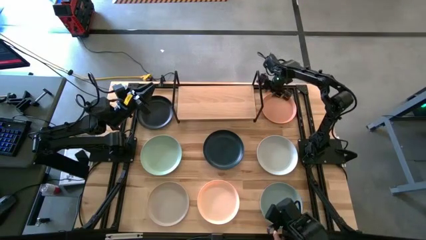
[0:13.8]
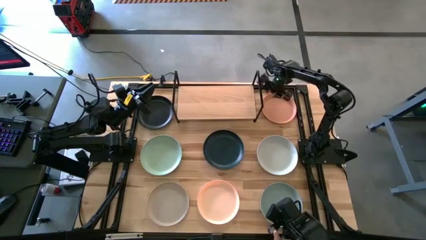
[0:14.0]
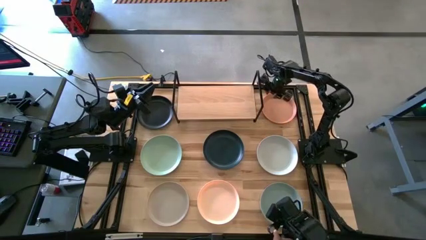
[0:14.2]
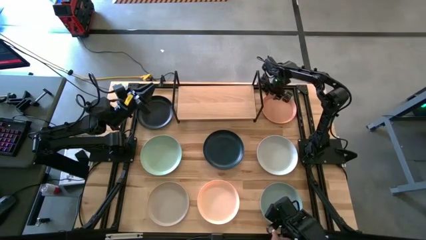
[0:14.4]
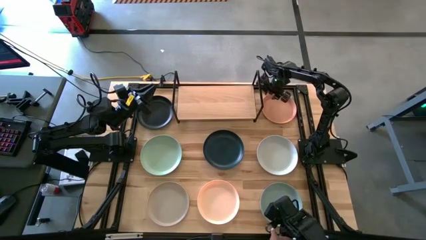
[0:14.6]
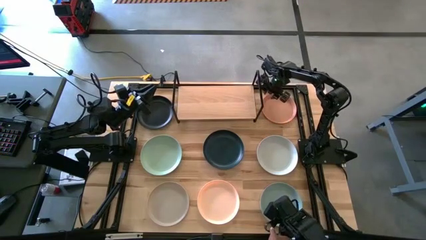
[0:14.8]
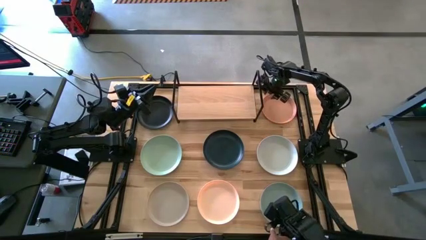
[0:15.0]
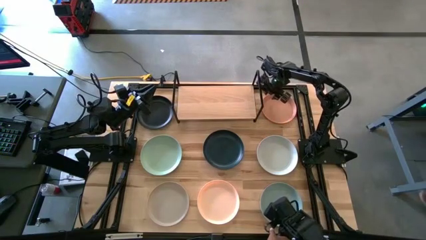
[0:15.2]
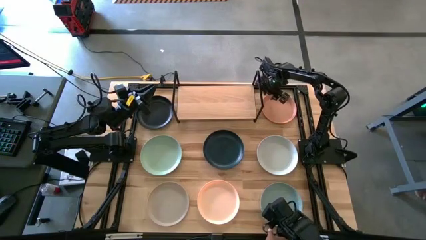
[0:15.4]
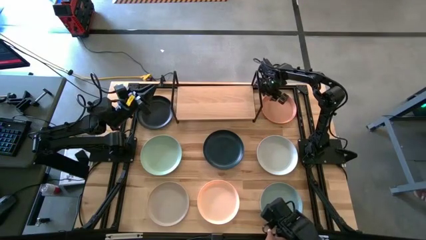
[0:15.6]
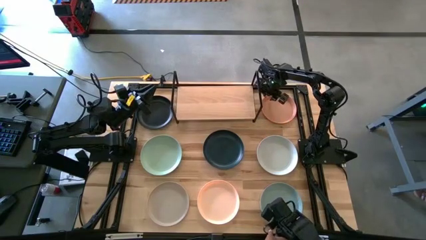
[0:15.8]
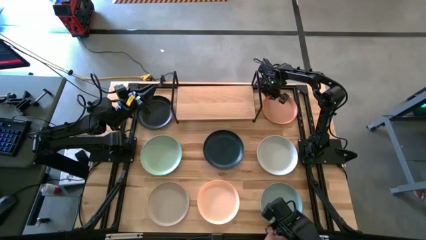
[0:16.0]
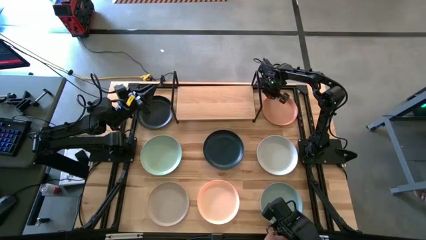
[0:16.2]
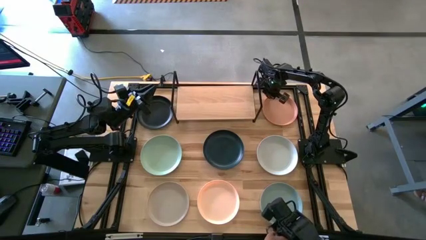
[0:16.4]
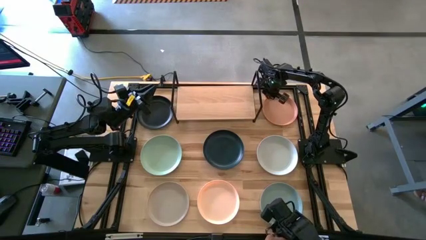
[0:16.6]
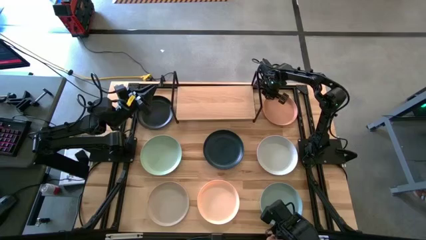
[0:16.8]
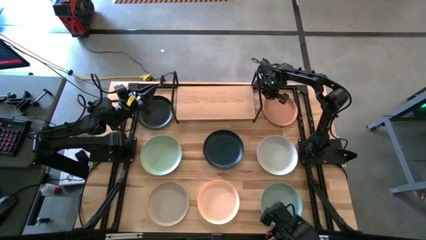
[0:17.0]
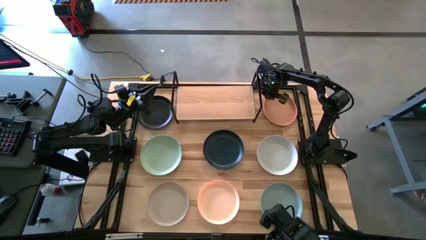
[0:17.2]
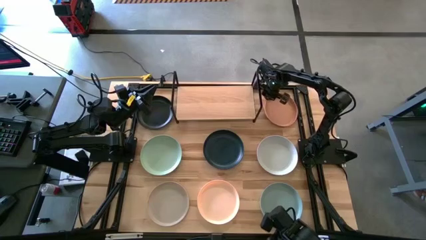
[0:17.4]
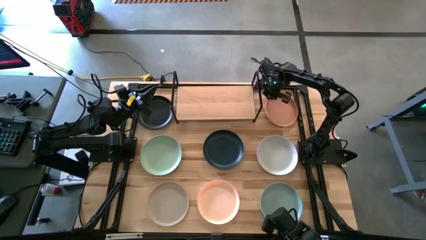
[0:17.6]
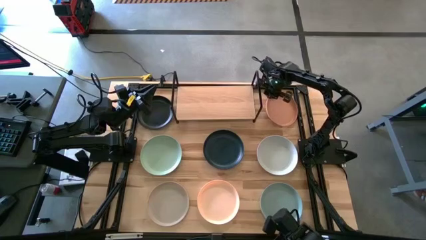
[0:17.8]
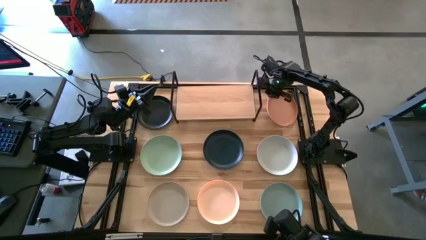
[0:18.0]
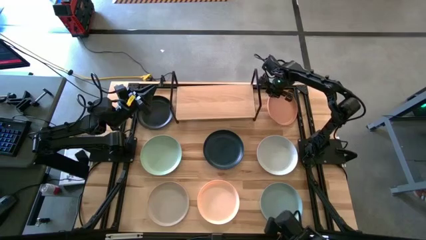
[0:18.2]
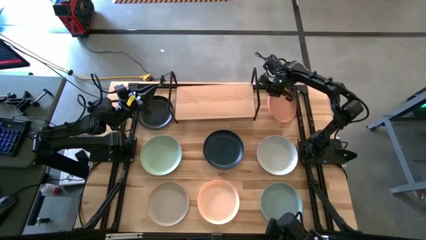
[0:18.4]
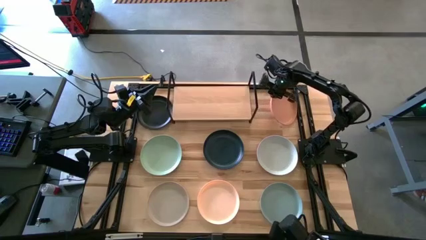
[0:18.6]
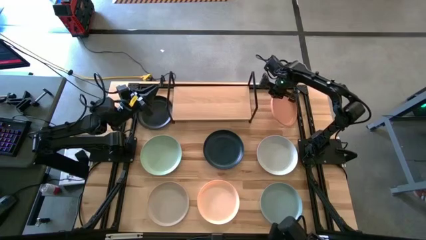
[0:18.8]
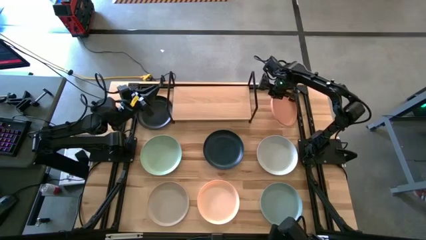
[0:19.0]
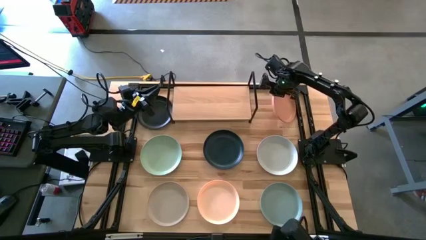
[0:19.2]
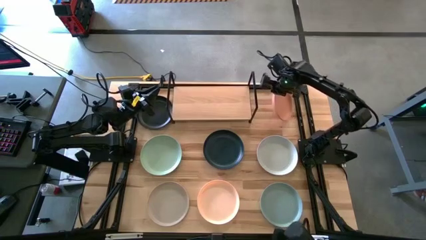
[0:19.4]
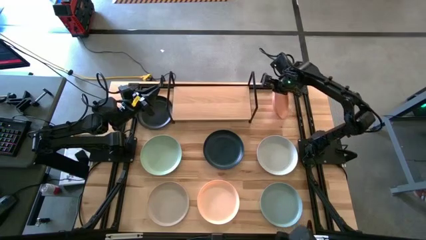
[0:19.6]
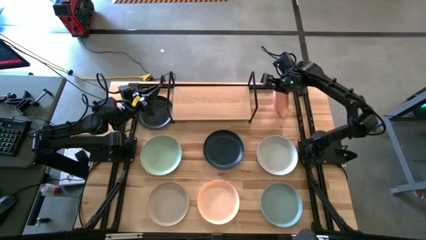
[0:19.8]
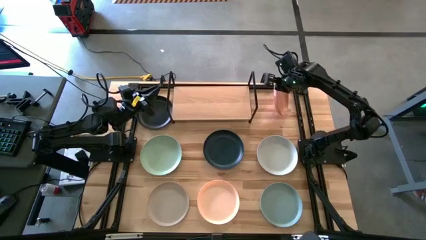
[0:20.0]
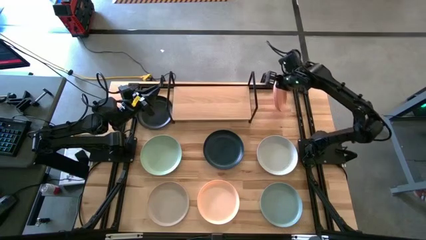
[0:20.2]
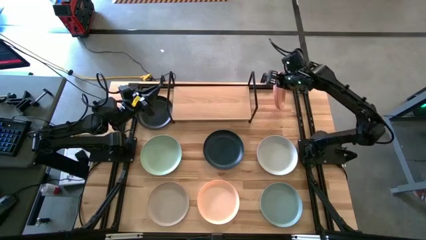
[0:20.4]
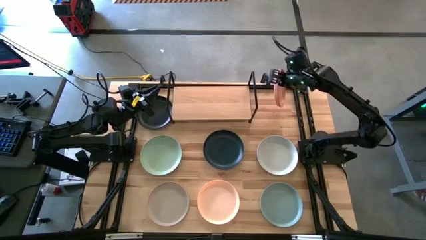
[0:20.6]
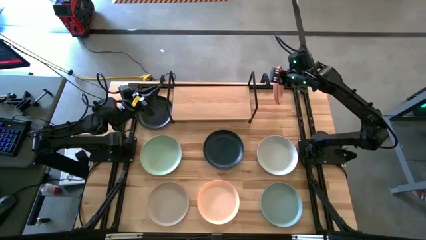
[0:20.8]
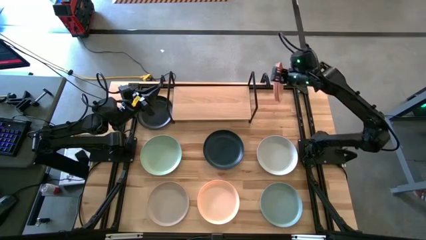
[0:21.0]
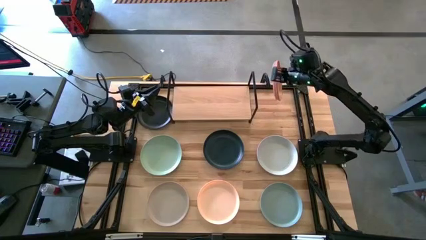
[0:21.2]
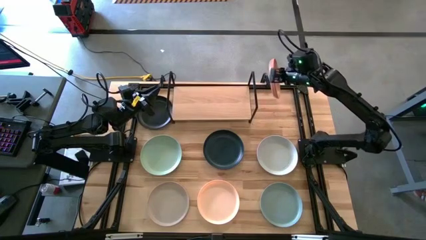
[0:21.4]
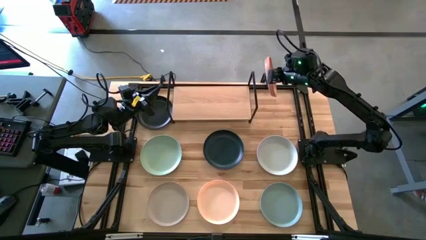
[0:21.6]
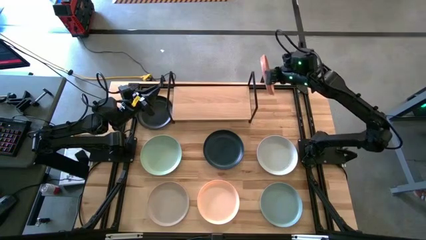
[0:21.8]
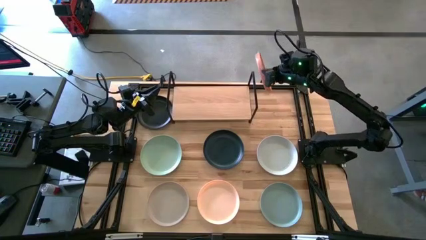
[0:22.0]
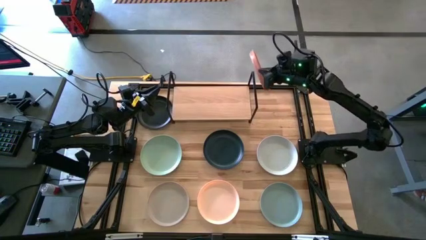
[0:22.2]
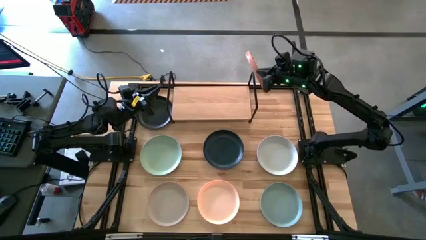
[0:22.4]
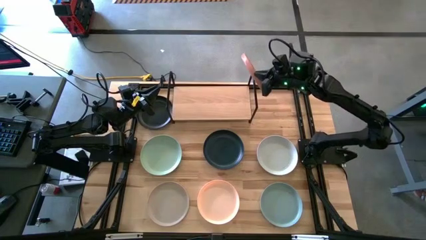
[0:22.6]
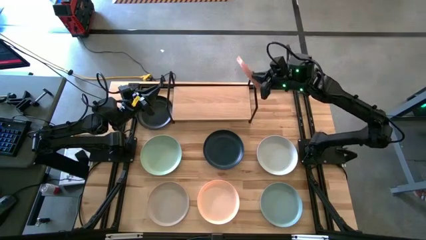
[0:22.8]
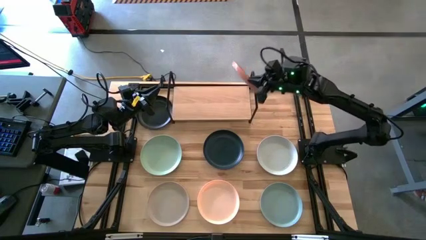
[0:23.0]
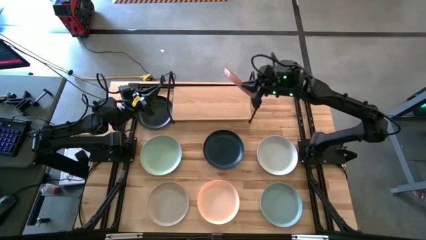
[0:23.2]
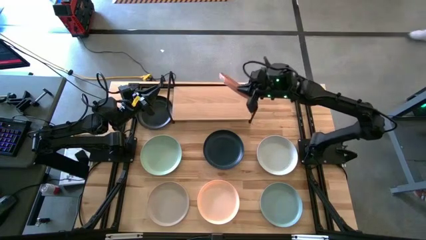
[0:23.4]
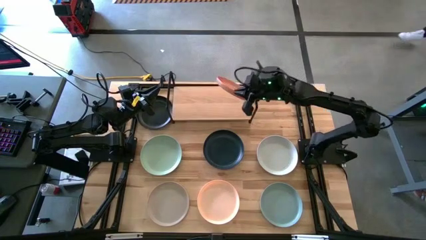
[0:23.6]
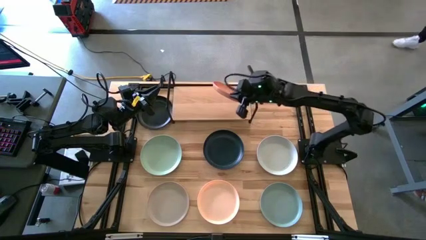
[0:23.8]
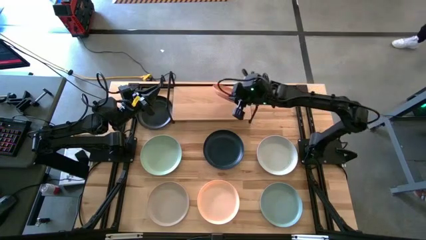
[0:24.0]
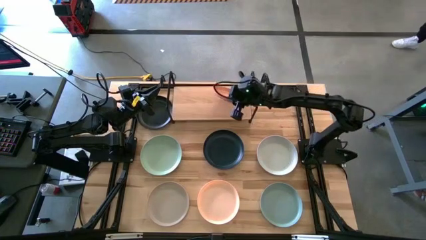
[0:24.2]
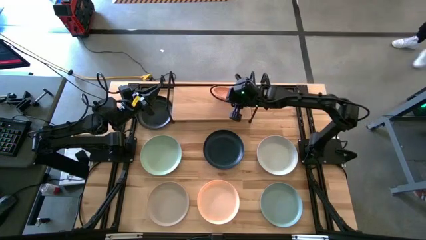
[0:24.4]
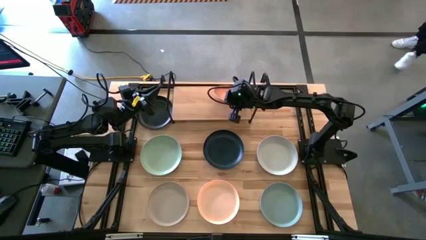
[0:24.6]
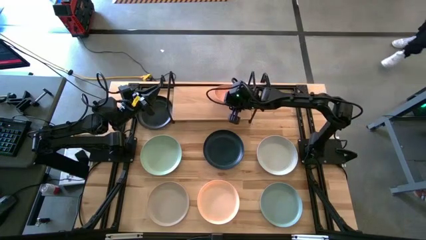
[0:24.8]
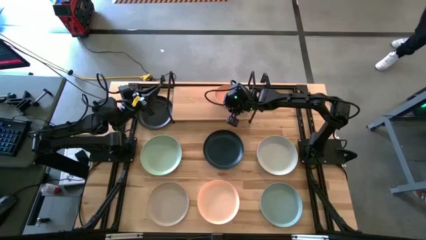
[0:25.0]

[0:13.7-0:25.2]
Task: Place and stack plates onto a shelf
Put the brown plate on the shelf

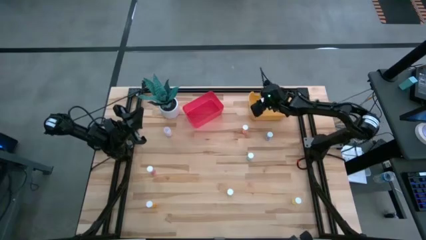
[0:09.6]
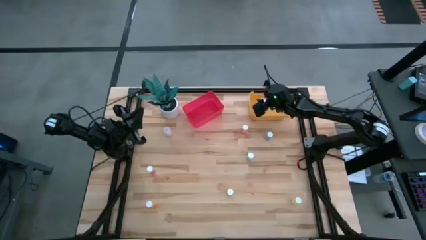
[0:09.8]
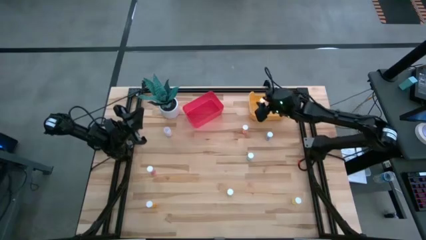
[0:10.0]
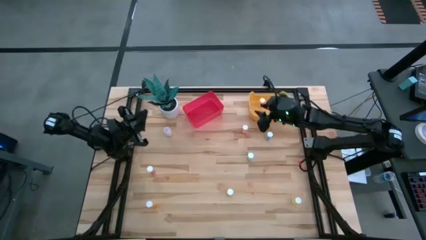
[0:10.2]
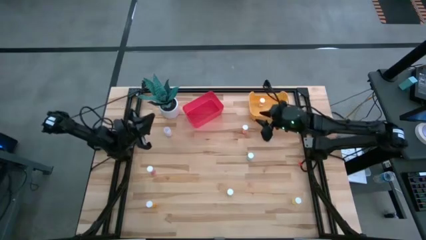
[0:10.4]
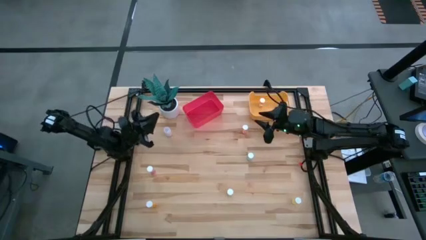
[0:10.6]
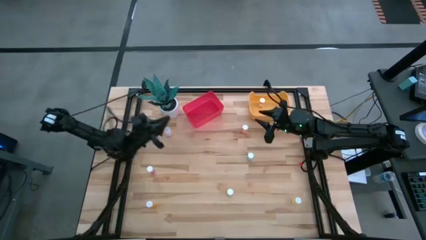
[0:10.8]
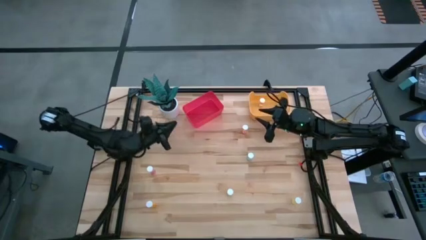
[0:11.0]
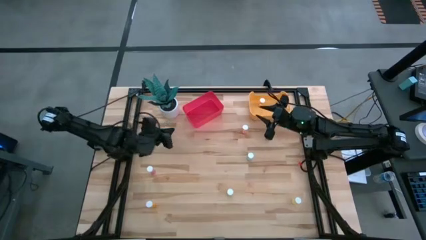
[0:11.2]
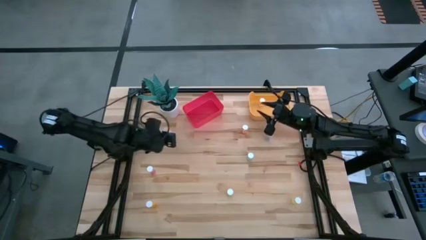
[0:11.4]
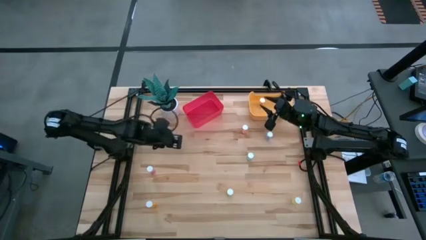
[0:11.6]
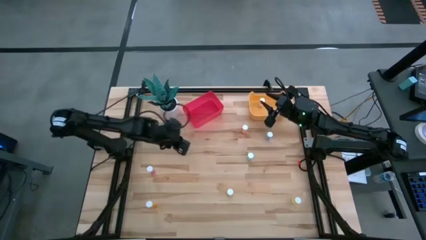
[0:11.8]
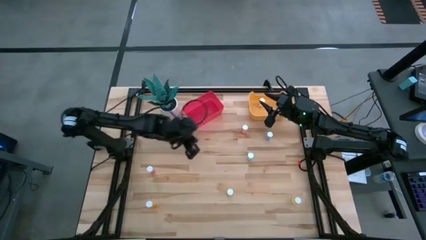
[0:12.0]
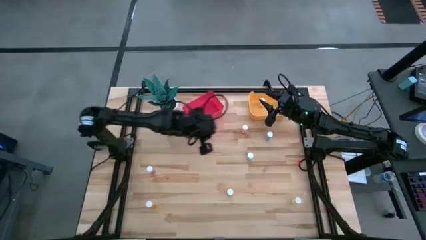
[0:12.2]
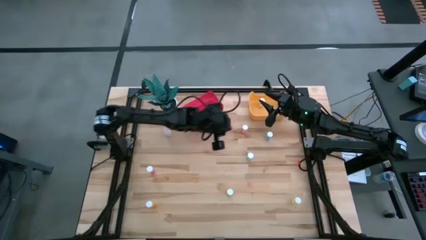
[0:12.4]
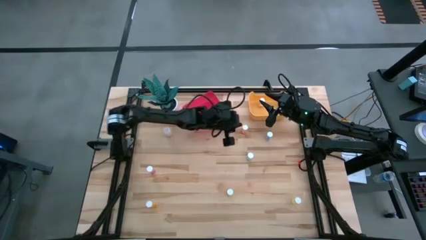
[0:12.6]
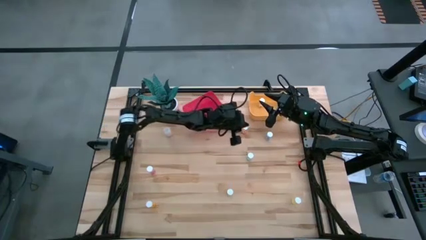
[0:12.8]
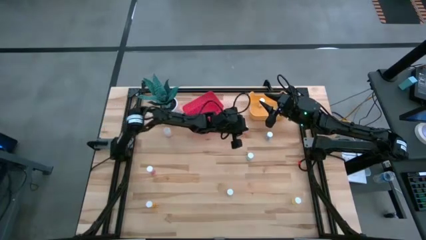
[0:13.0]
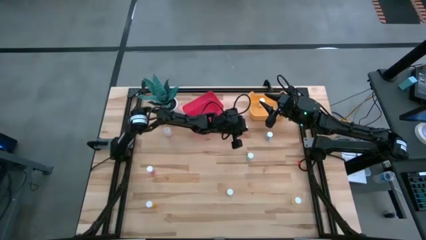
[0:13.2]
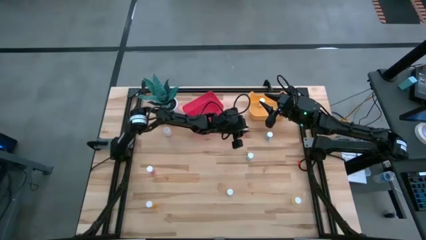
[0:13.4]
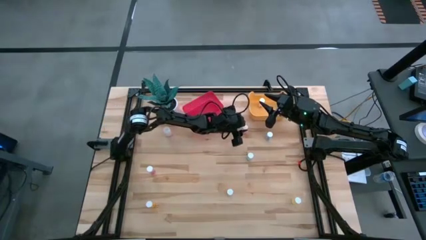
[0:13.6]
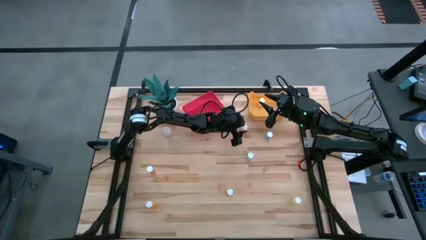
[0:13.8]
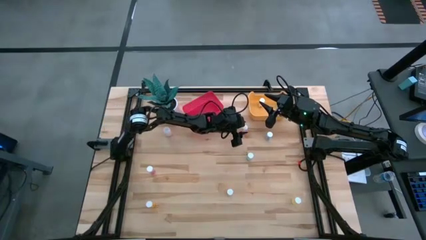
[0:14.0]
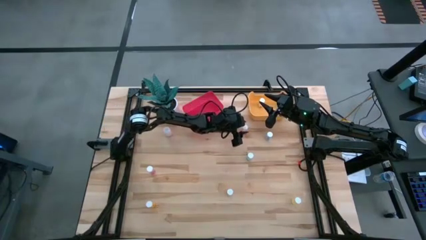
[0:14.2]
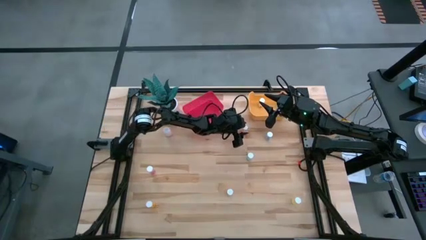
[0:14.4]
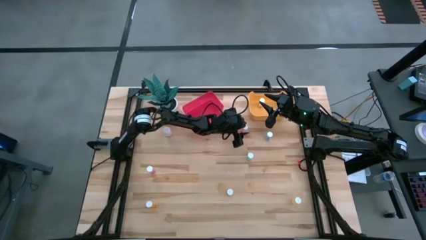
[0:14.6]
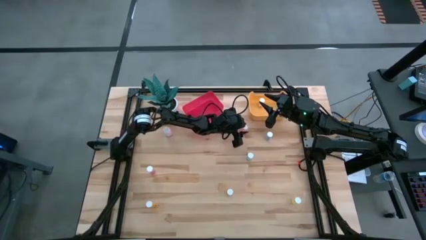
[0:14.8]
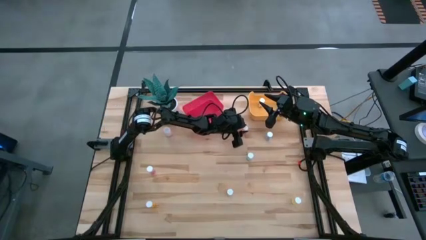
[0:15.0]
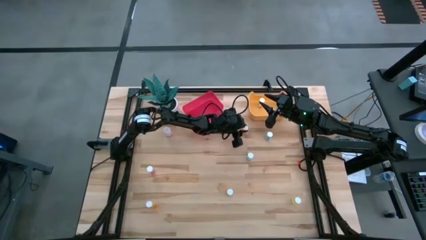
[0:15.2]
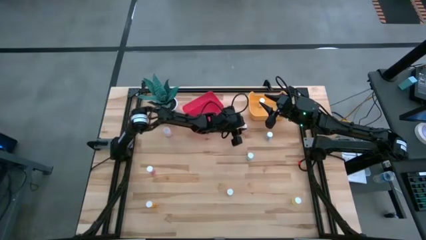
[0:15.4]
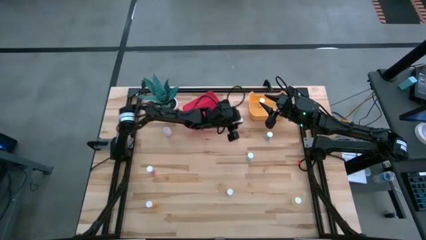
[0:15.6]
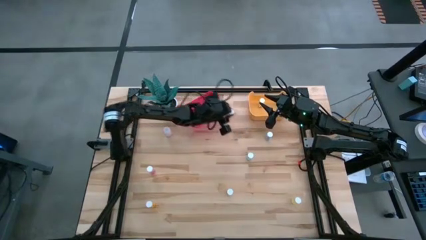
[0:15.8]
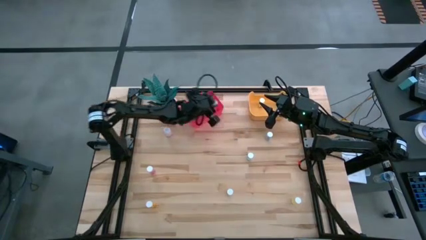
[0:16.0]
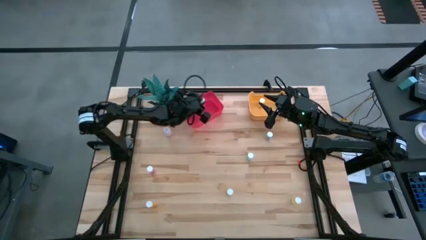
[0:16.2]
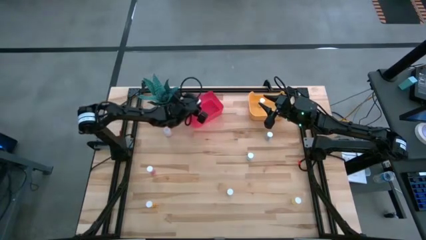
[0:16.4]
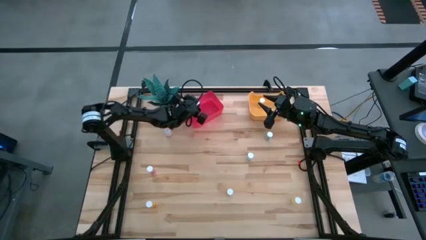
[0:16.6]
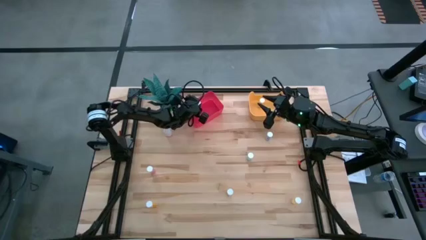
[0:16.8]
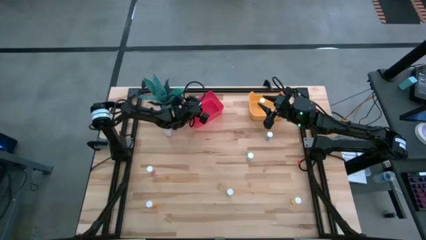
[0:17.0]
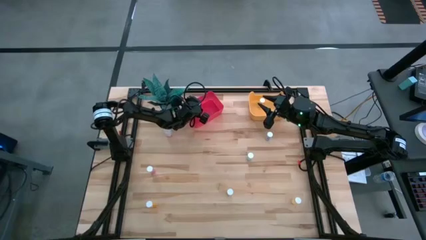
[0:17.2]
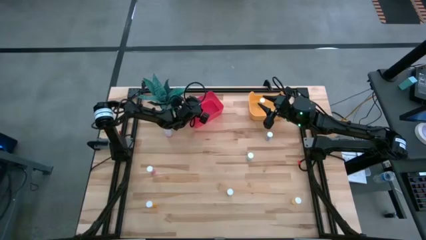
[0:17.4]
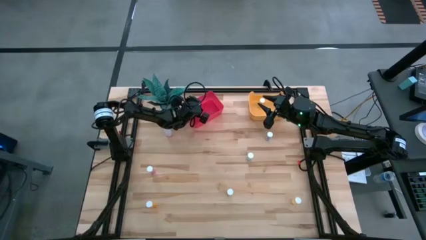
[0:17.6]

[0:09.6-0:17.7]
Task: Pick and place medicine bottles into bin by pill shape (circle, oval)
Put the red tablet bottle into the pink bin
